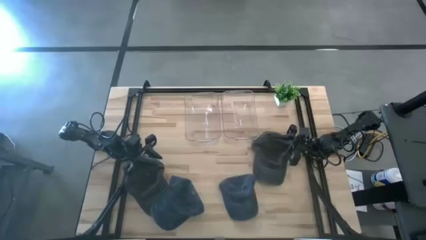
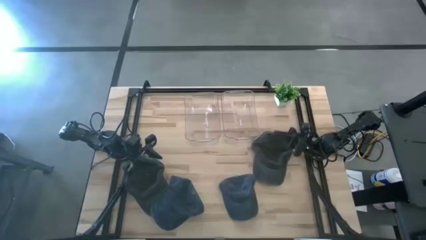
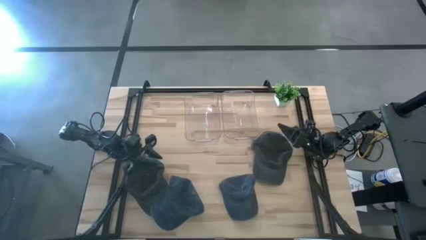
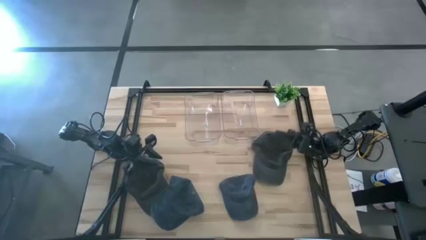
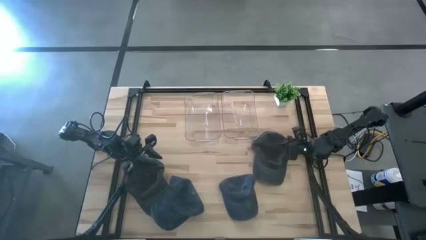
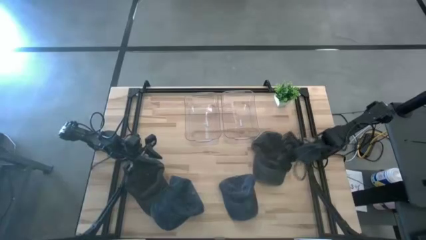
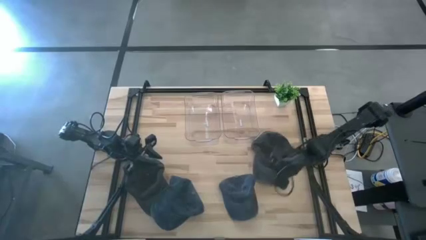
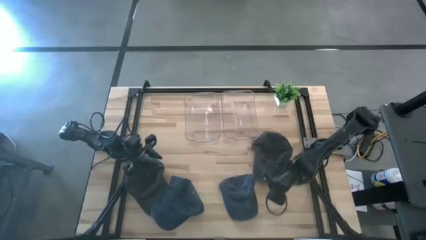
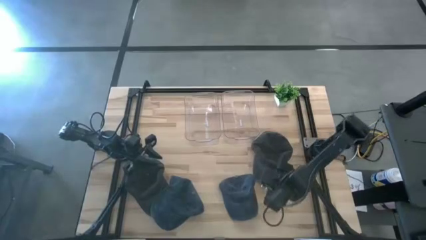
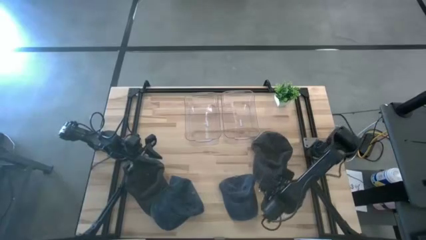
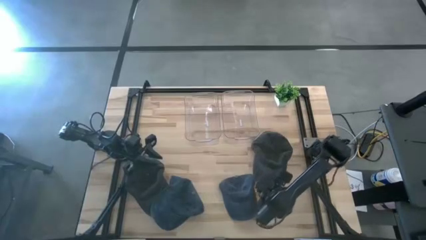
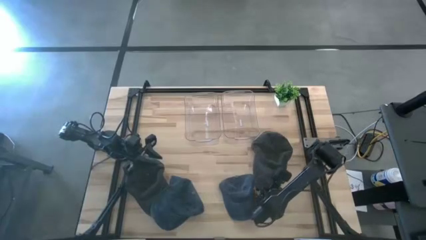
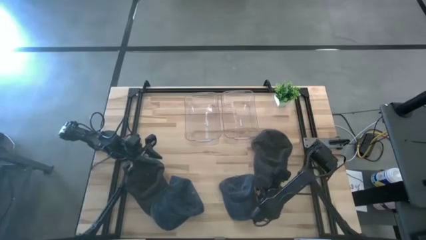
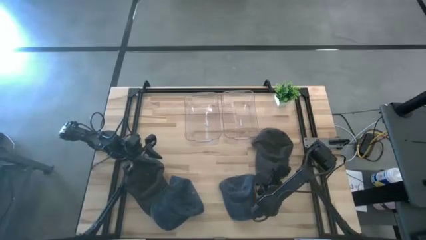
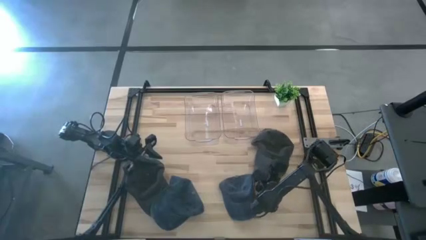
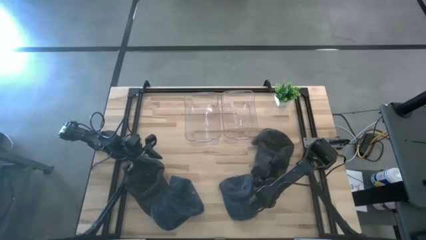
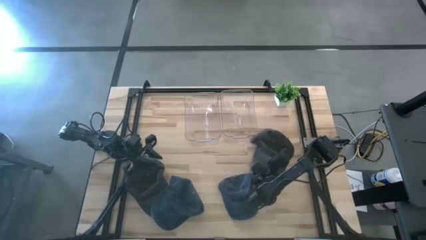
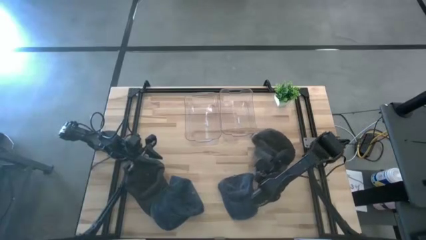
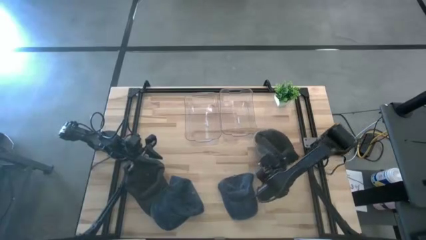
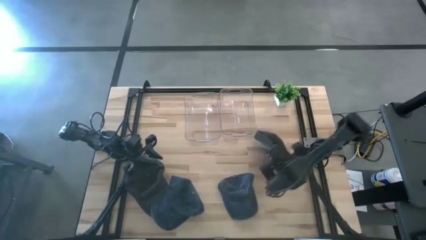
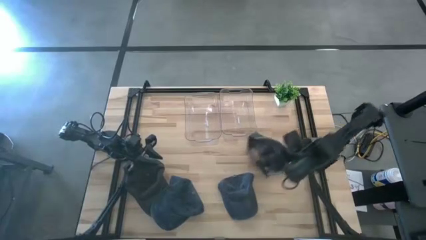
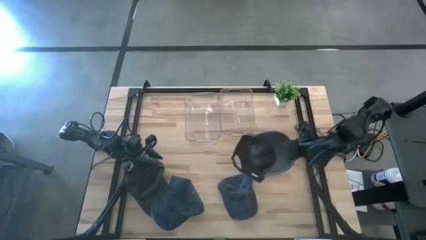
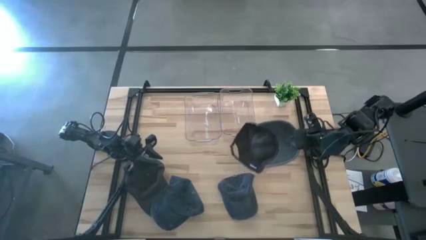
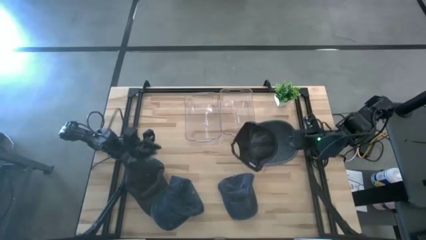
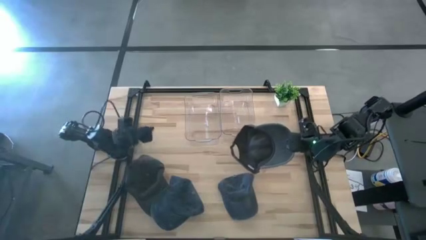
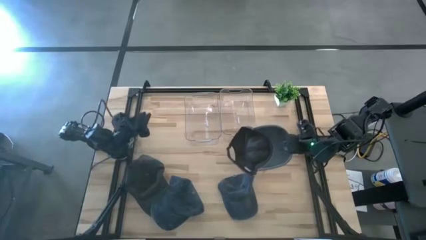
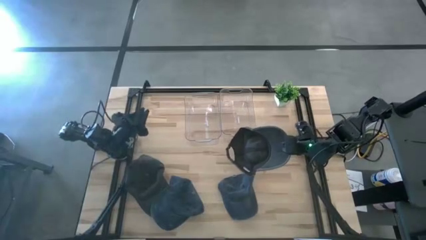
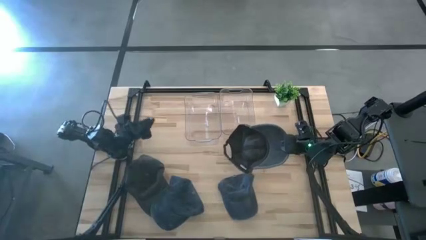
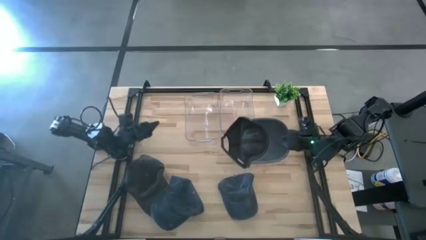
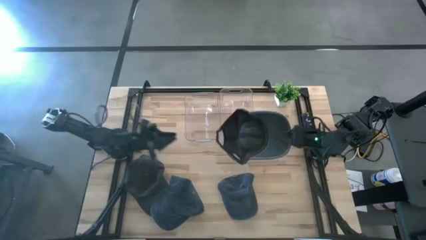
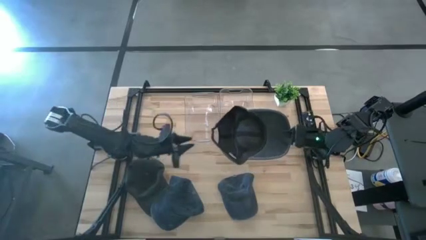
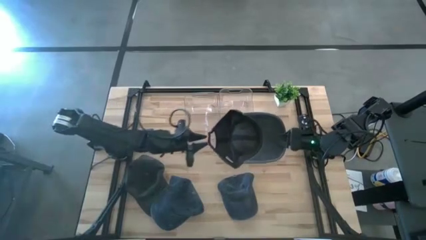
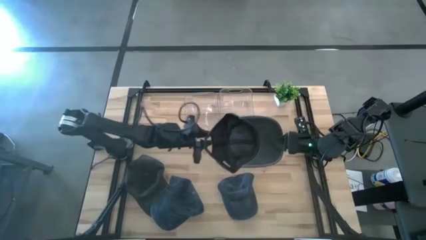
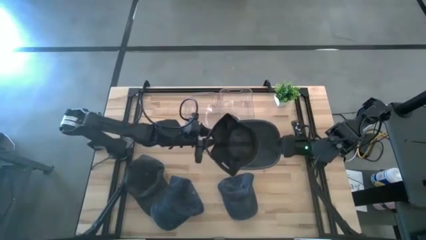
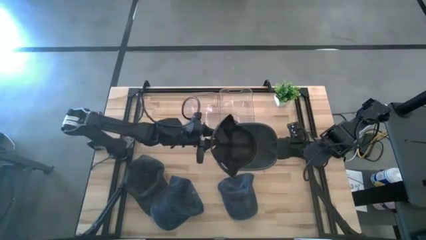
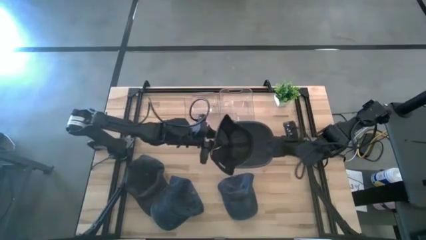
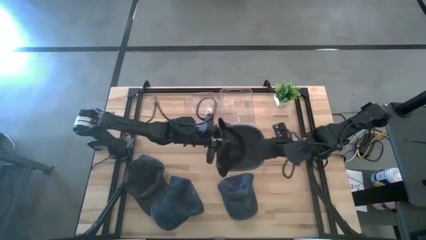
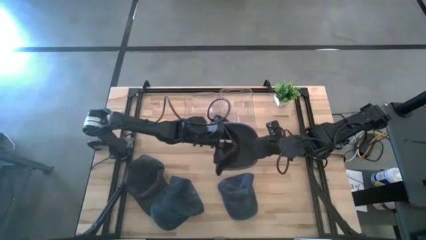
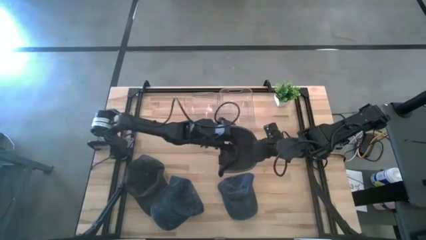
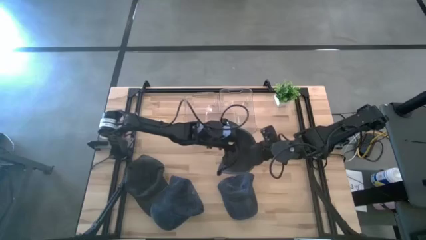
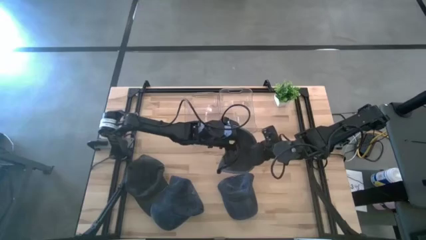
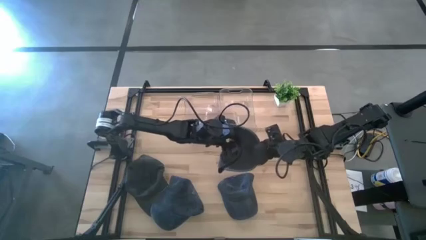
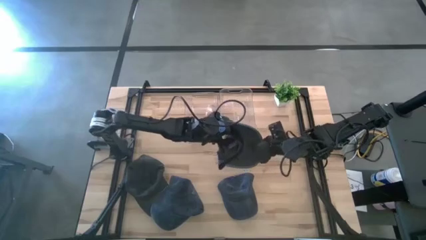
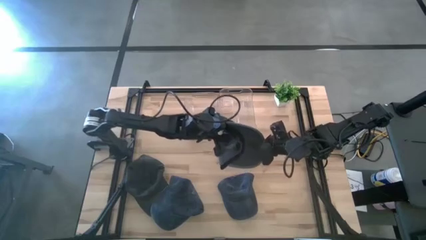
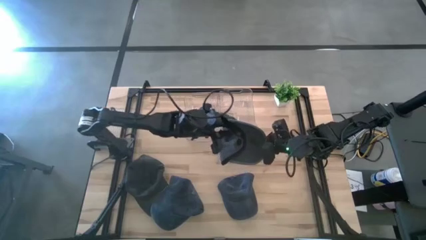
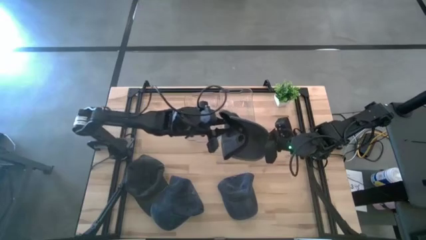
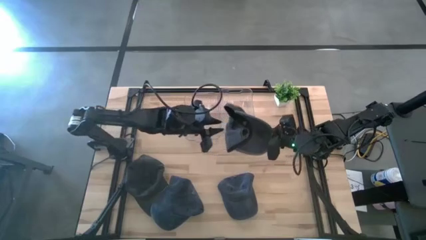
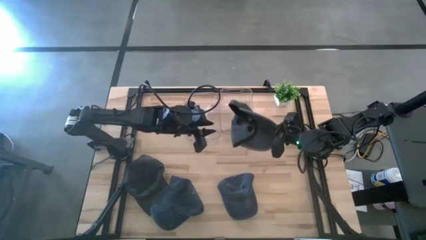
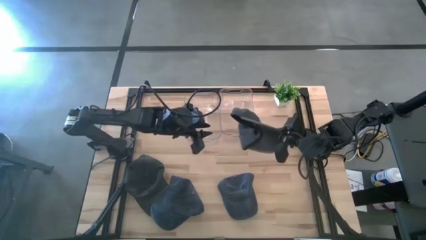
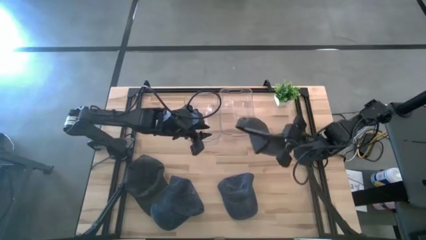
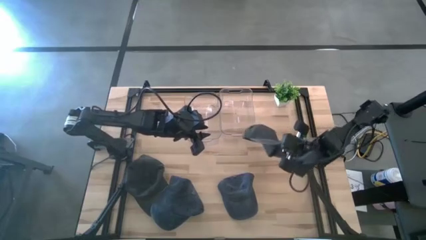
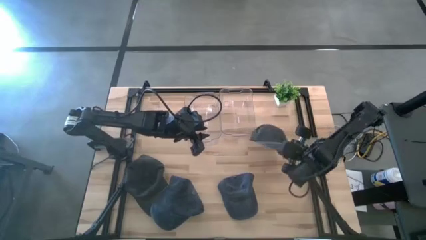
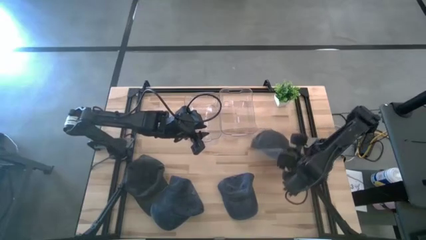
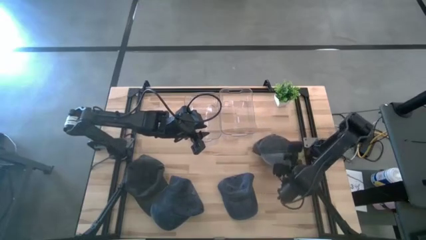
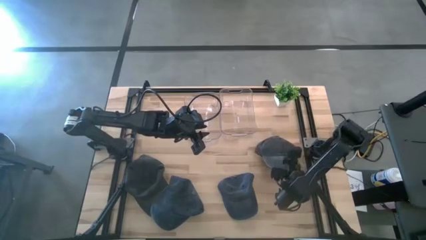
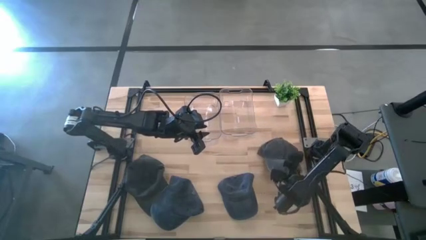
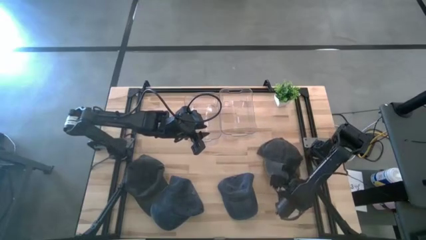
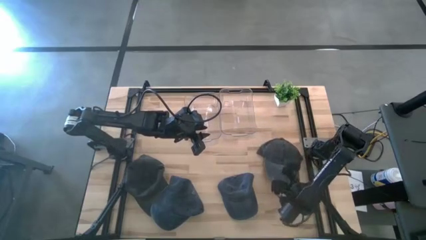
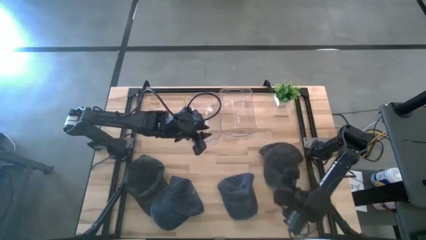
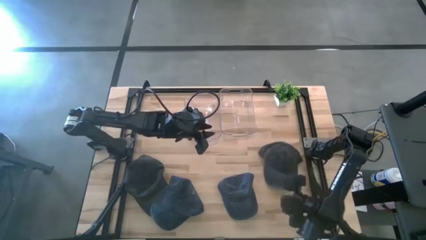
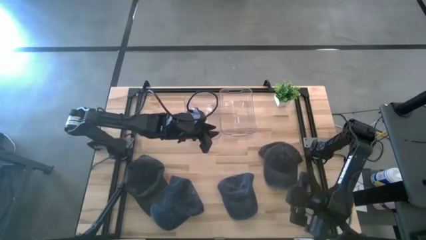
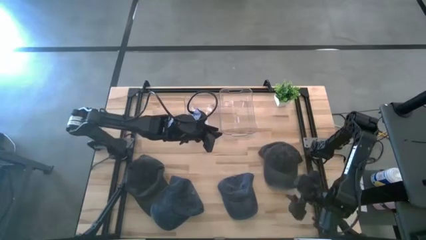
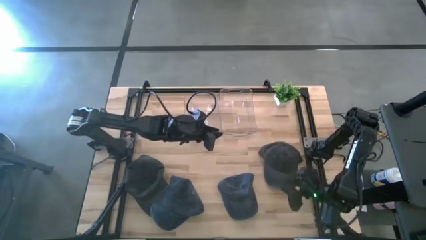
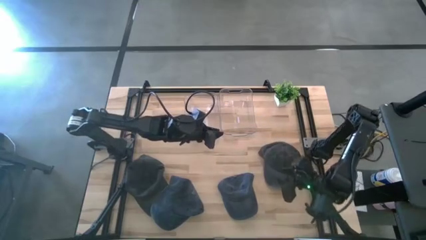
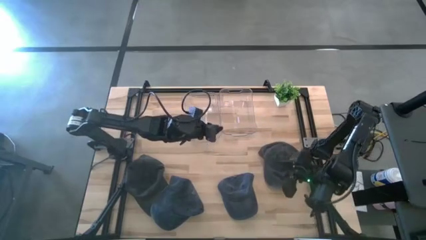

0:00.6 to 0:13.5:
Task: Pick & Place hat
Put the right black cap into the right transparent bin
